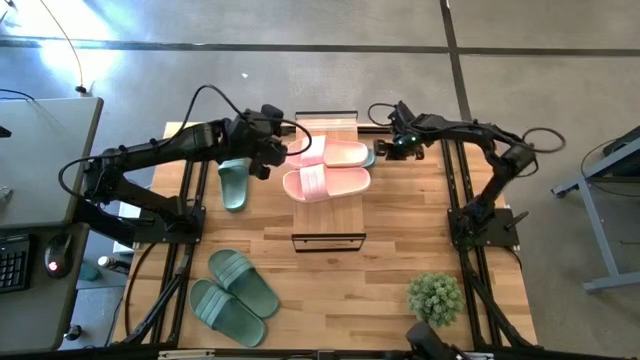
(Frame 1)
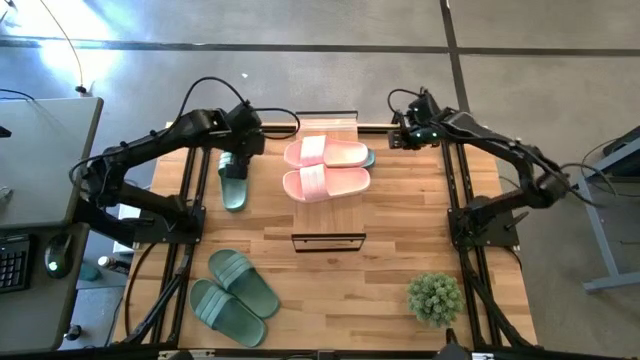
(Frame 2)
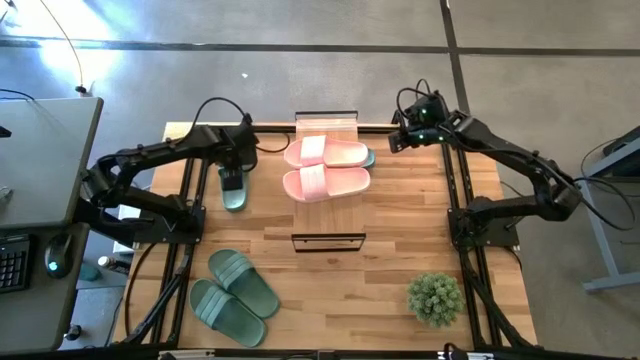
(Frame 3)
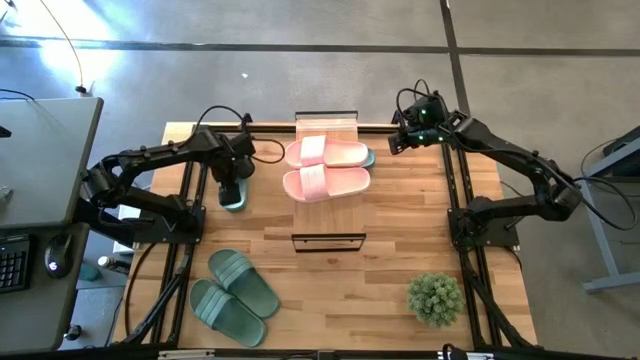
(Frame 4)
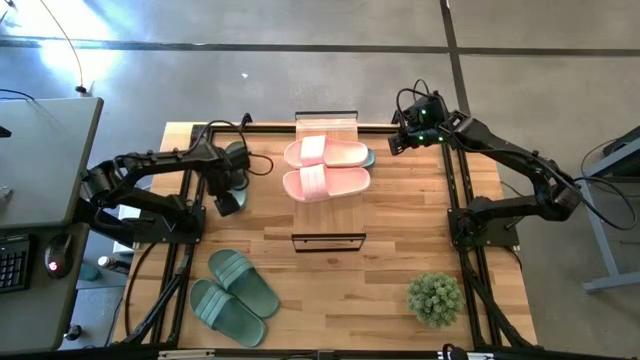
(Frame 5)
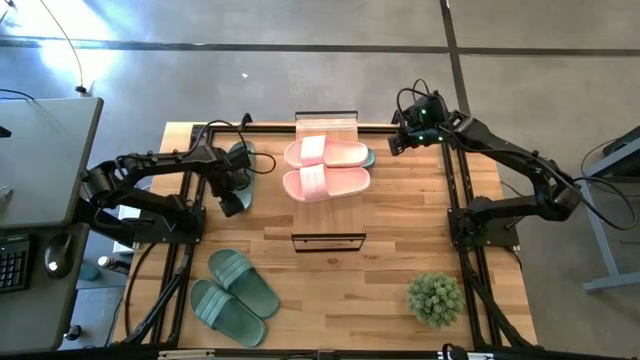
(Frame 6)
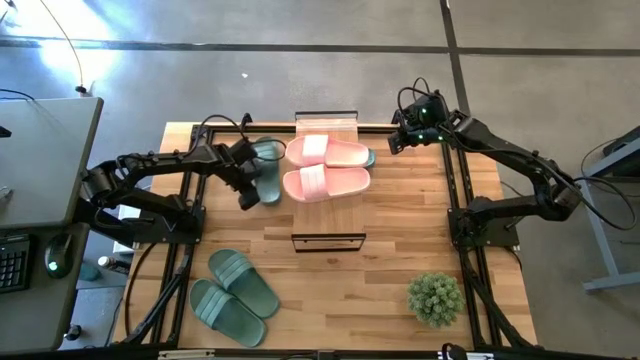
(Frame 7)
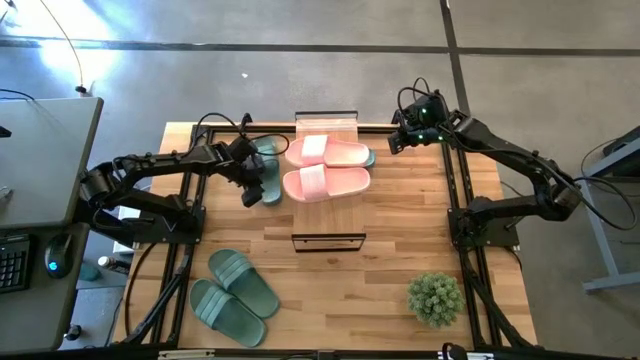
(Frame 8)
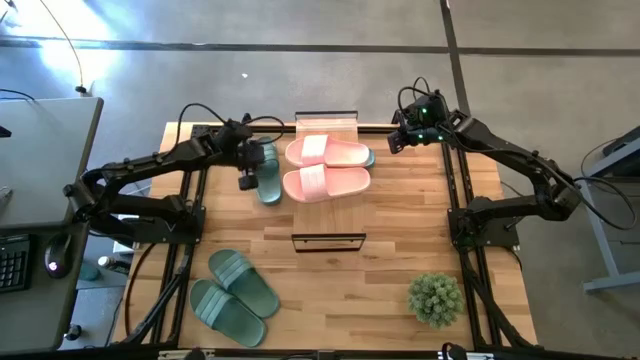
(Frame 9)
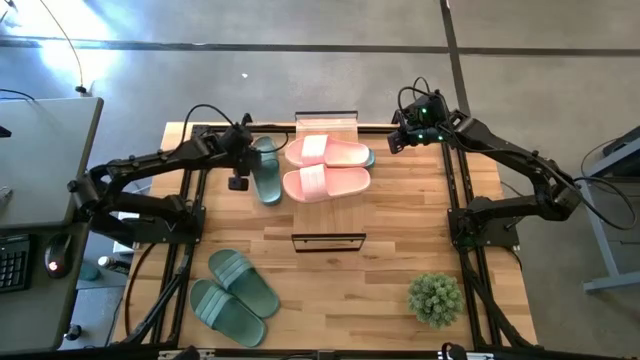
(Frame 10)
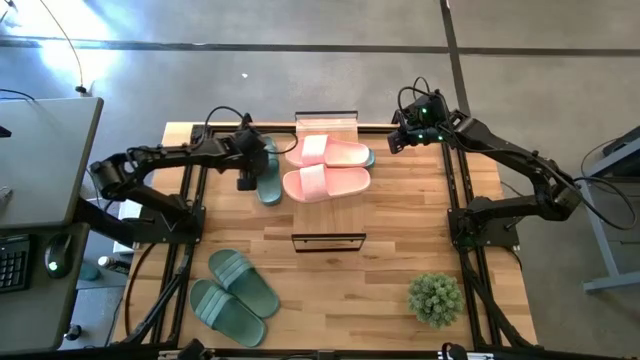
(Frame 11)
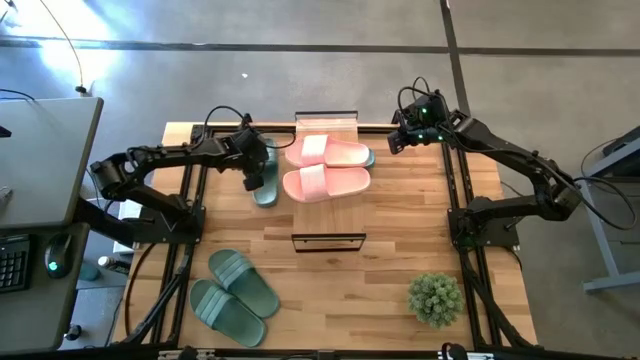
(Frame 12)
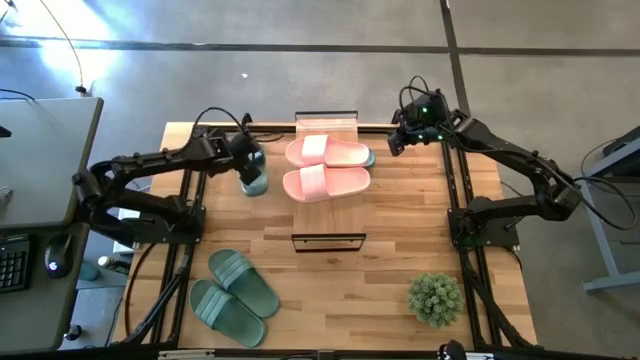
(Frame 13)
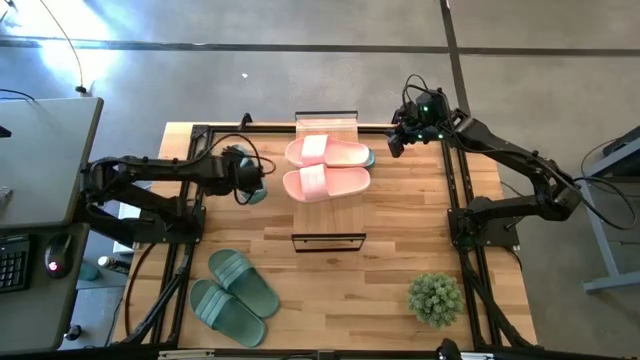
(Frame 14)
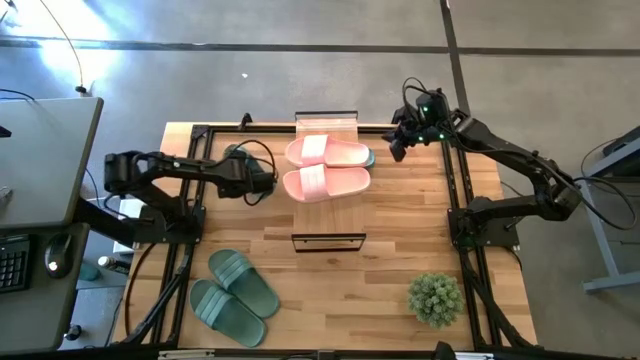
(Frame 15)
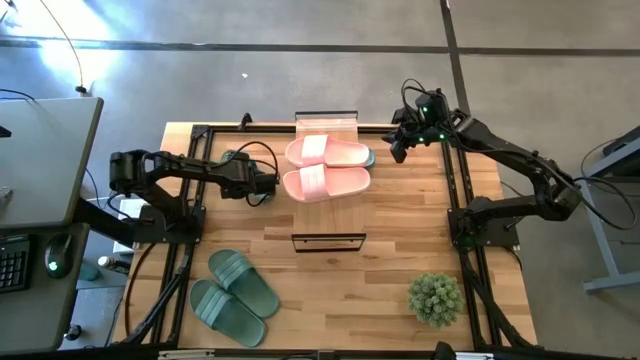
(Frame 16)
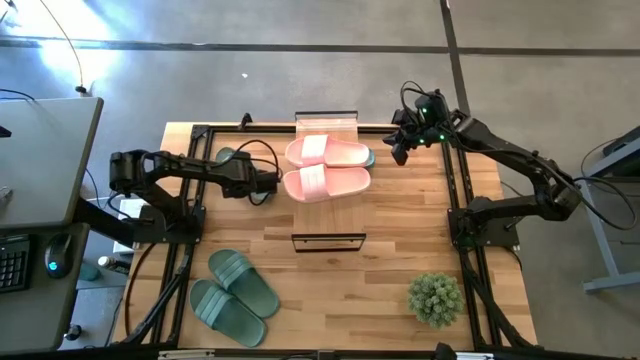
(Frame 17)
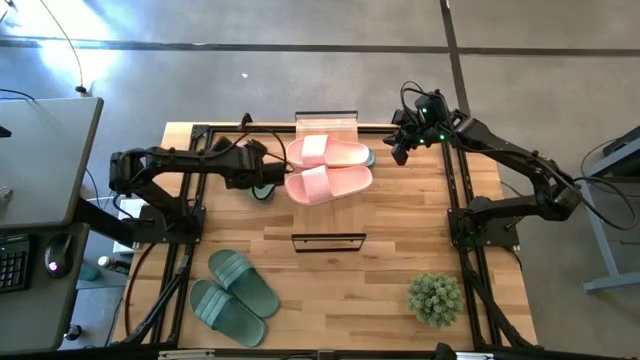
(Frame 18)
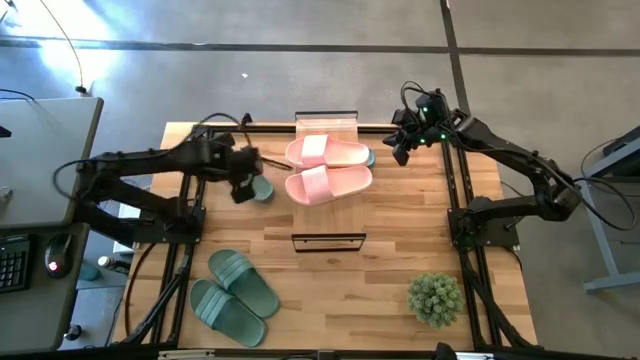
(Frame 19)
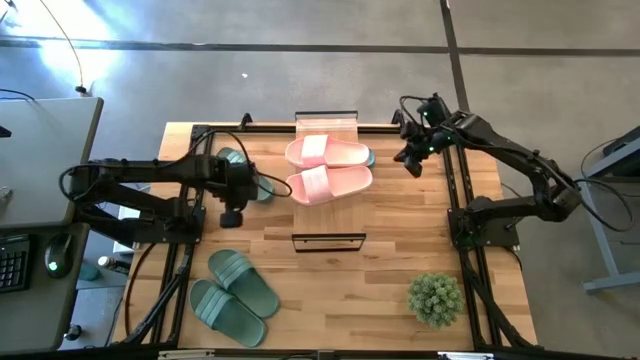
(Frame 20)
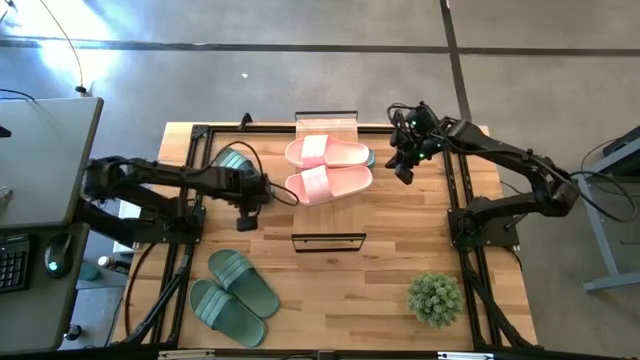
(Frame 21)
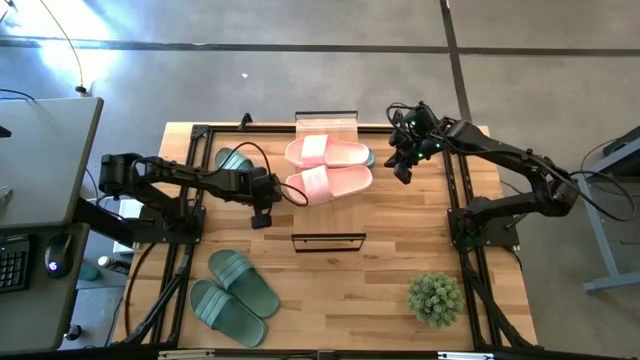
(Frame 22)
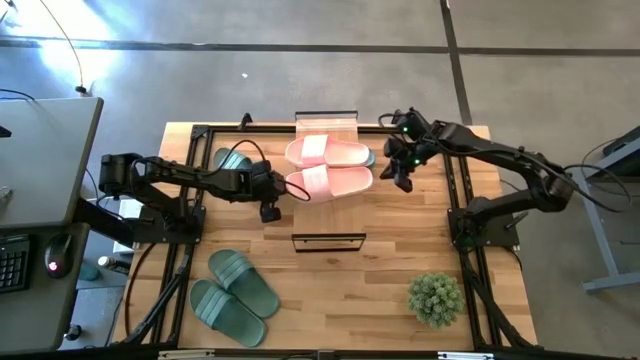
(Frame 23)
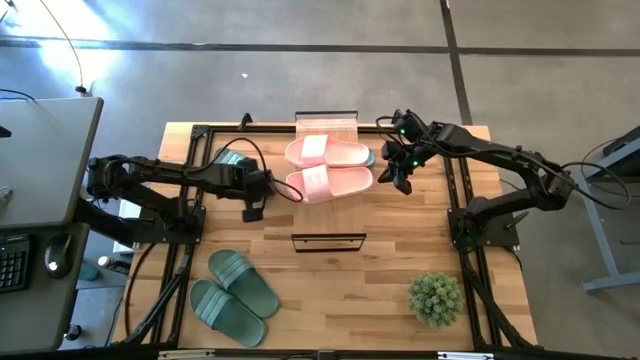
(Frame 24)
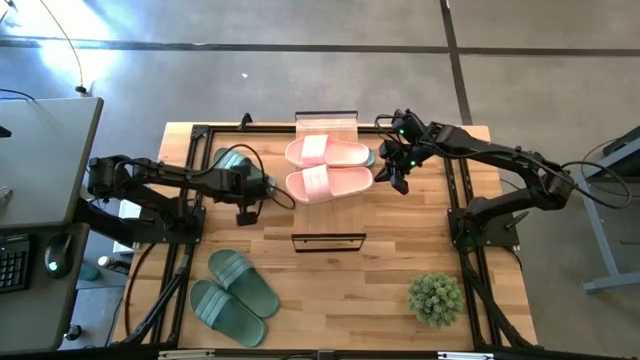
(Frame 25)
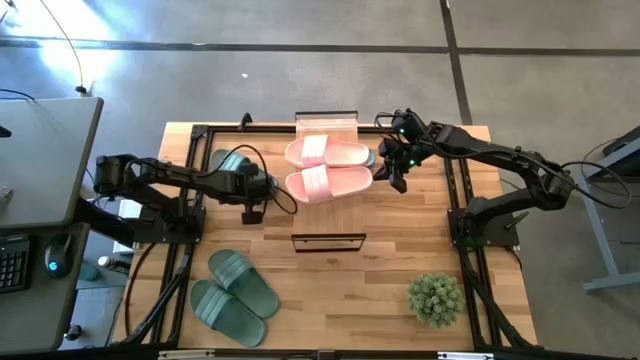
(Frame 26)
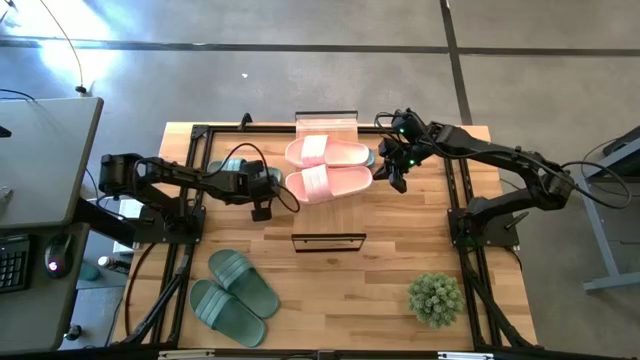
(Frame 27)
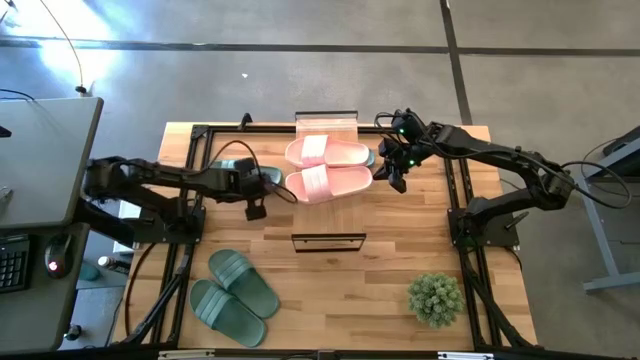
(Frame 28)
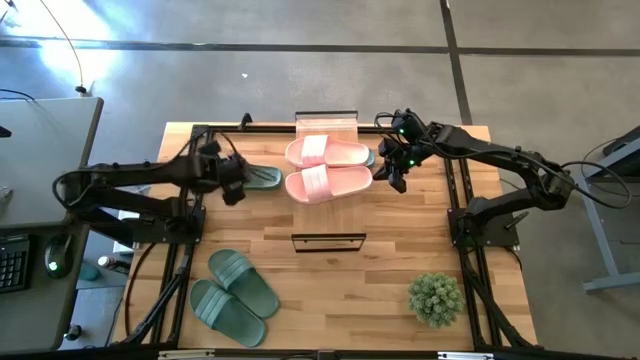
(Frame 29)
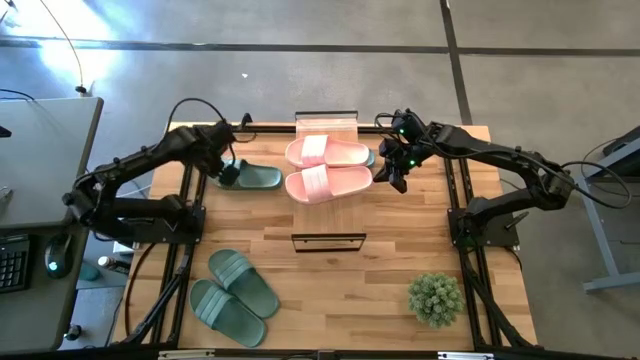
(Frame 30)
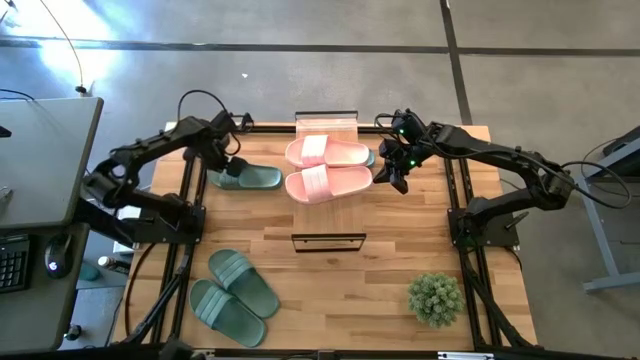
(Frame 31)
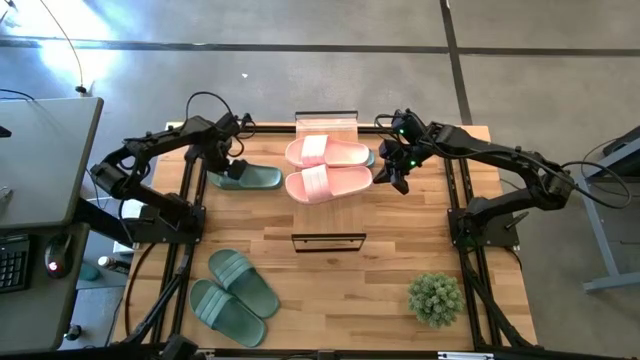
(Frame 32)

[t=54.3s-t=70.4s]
Task: Pick and place slides into the shelf
Put the green slide under the shelf

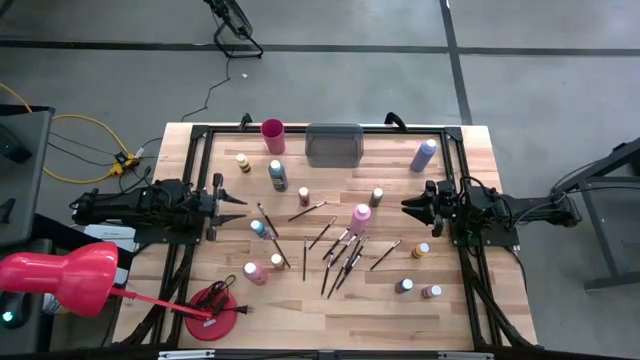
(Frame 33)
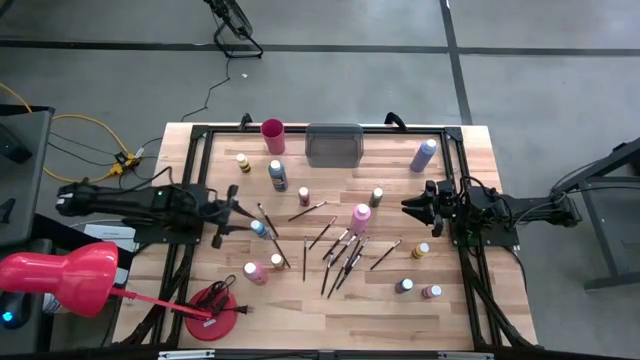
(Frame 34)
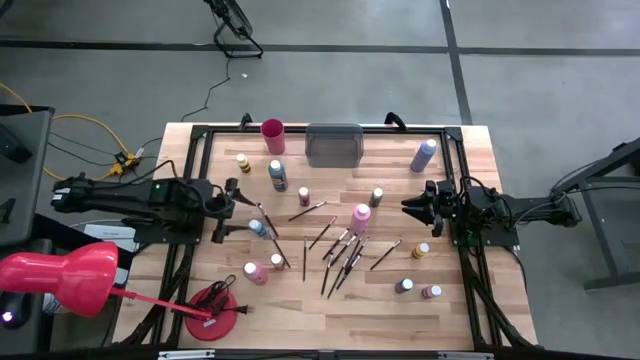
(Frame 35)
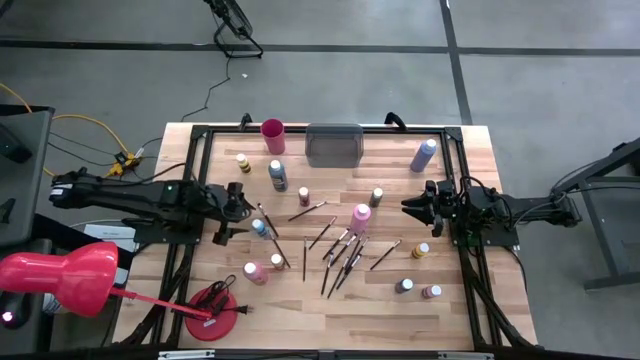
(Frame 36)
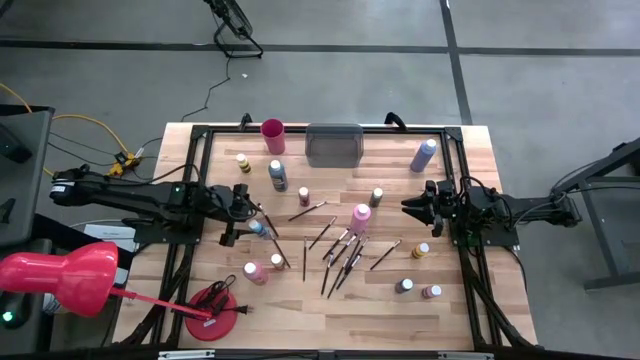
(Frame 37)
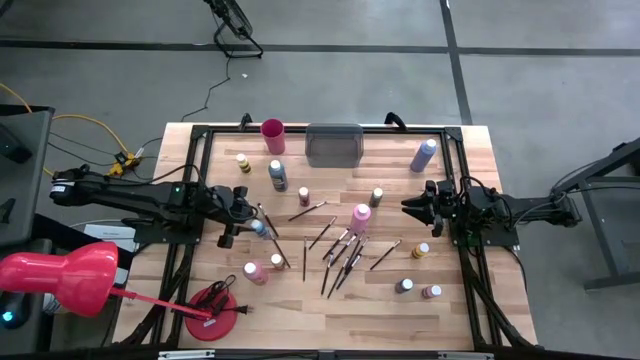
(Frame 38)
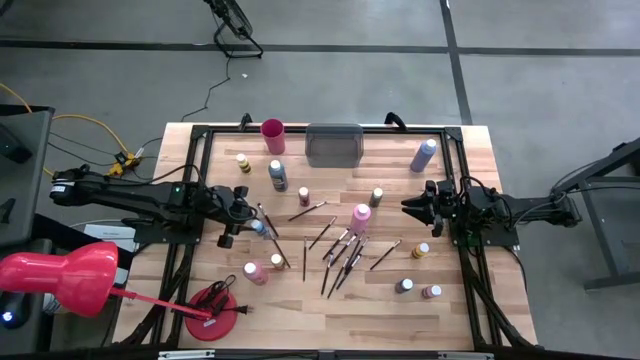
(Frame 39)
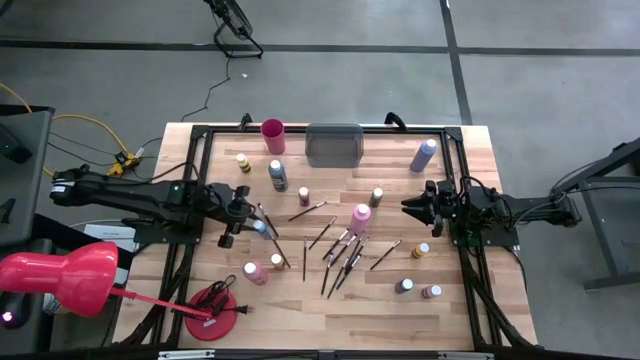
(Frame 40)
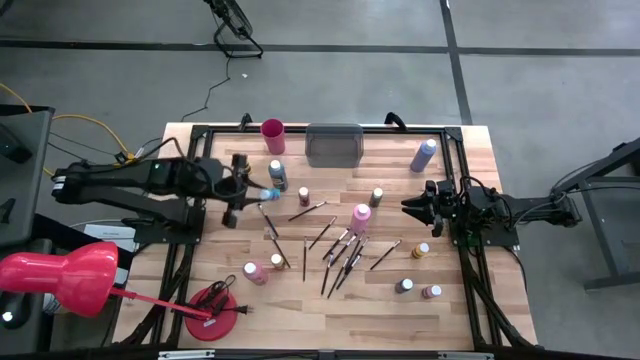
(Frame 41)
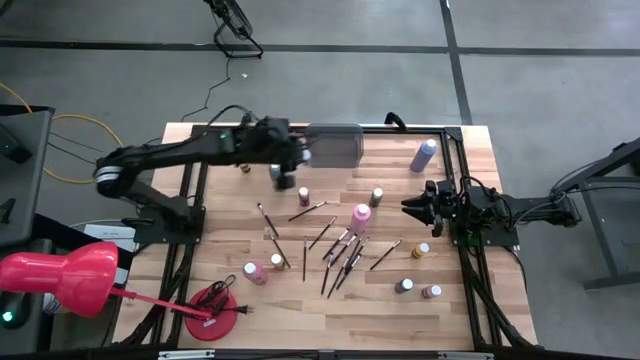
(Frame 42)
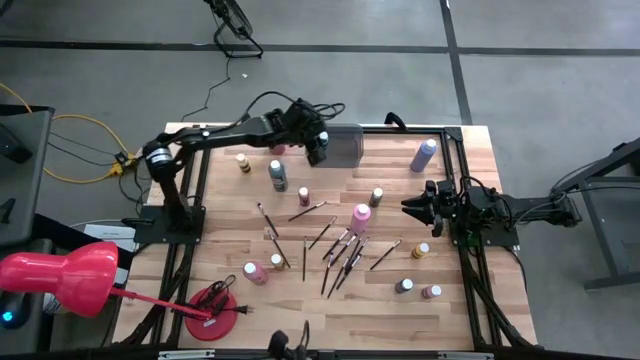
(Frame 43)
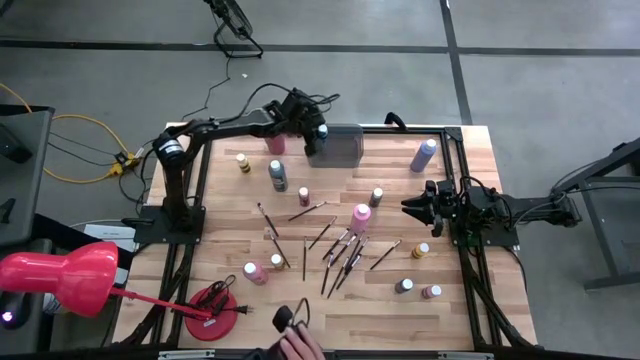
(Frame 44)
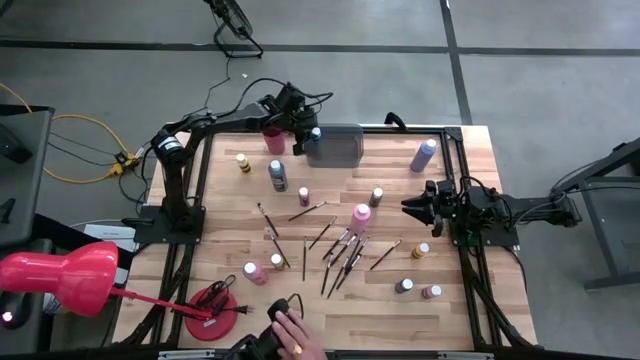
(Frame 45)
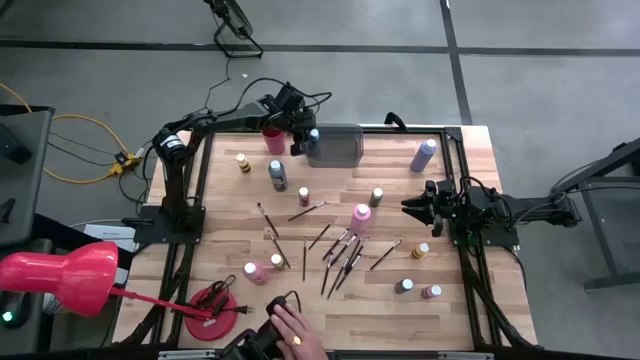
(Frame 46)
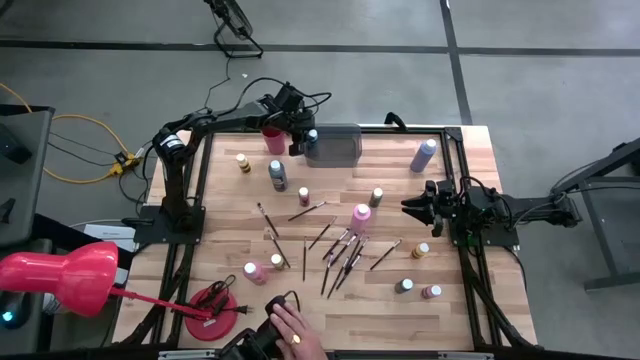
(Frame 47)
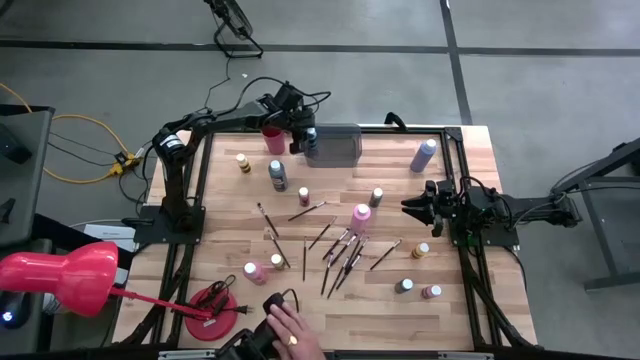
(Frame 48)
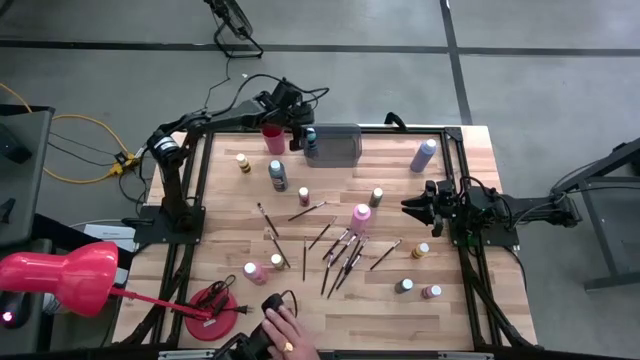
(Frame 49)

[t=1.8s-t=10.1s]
Task: Pick & Place Paint Supplies
Put the small blue paint bottle into the black bin
